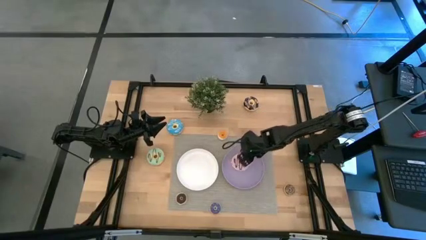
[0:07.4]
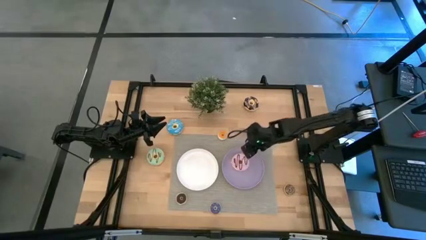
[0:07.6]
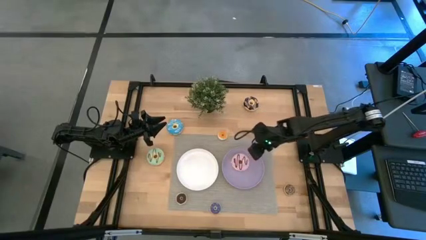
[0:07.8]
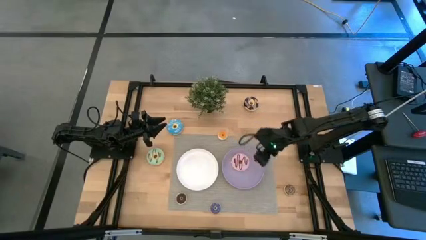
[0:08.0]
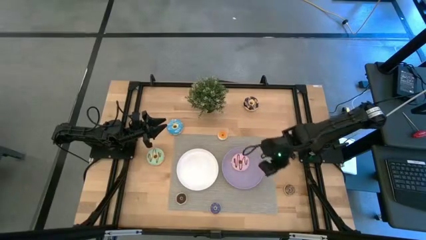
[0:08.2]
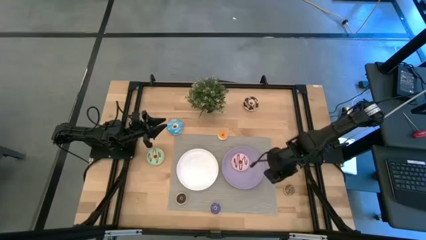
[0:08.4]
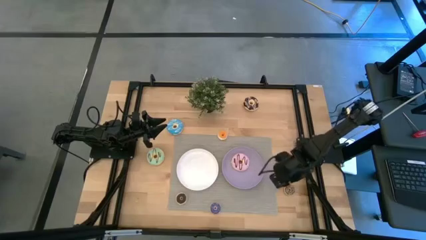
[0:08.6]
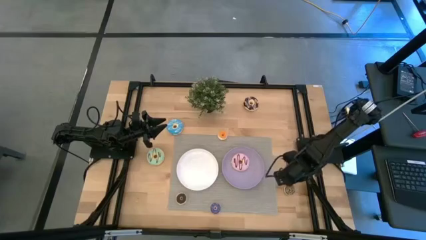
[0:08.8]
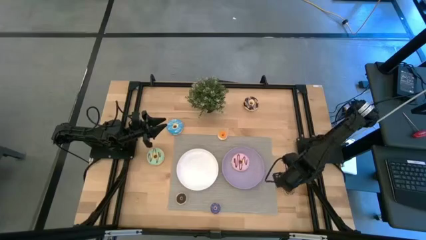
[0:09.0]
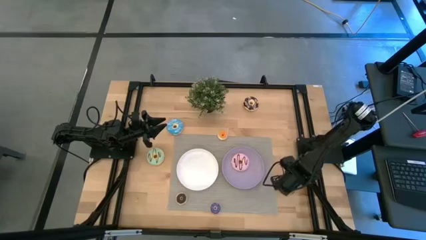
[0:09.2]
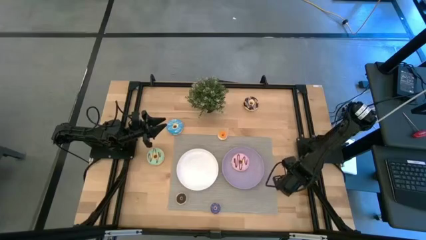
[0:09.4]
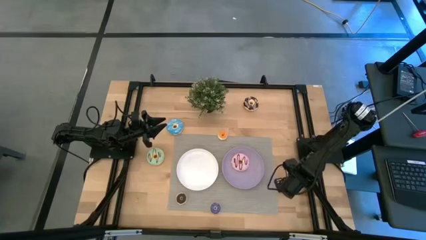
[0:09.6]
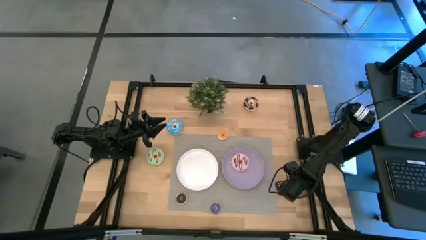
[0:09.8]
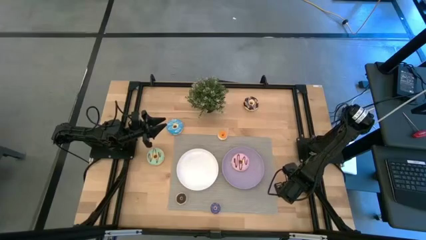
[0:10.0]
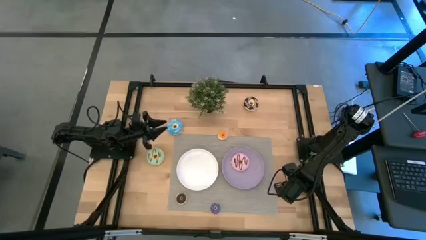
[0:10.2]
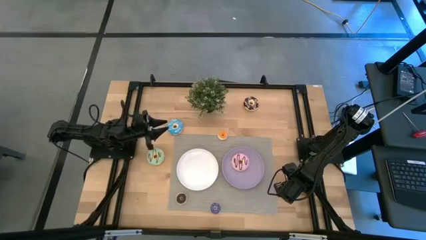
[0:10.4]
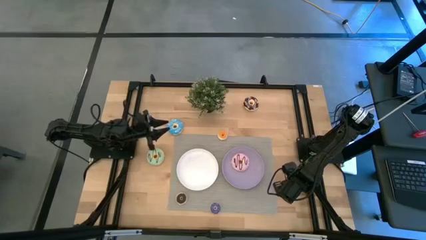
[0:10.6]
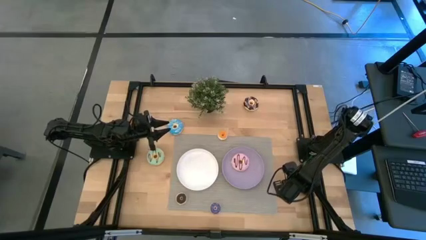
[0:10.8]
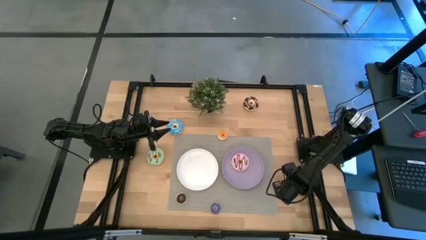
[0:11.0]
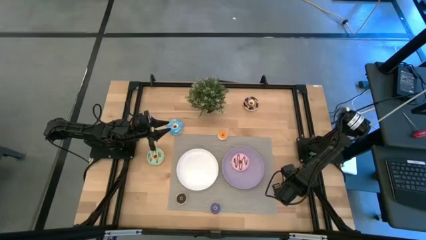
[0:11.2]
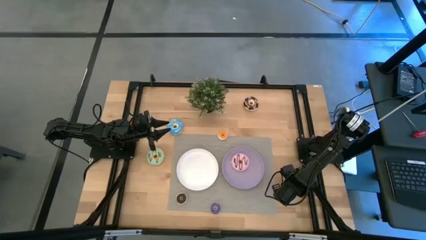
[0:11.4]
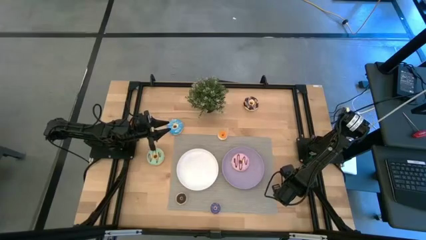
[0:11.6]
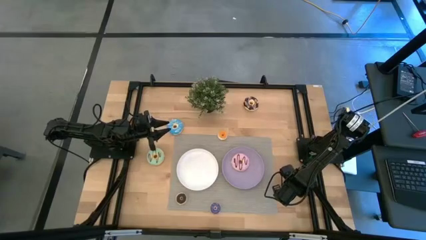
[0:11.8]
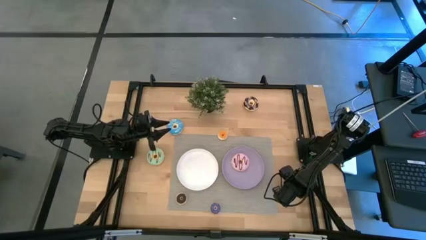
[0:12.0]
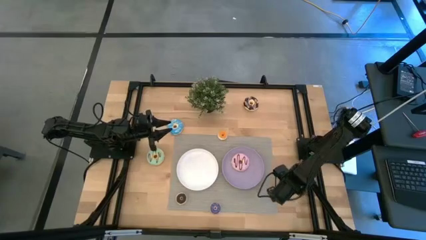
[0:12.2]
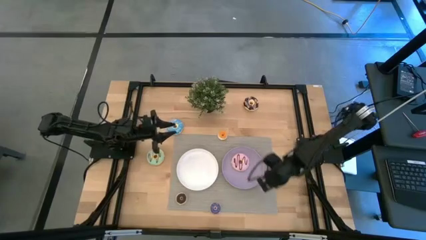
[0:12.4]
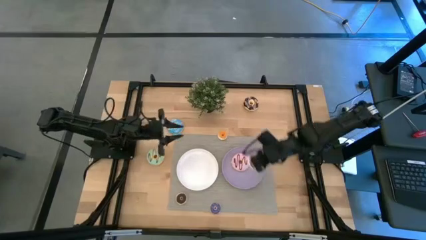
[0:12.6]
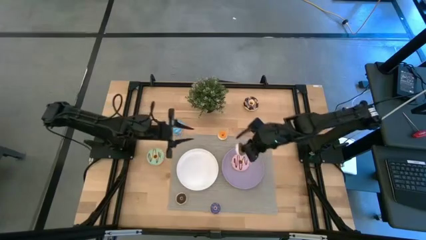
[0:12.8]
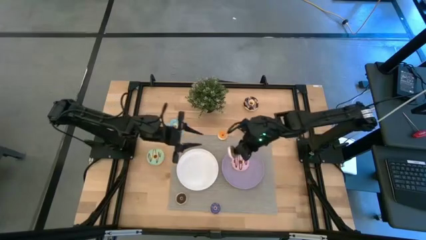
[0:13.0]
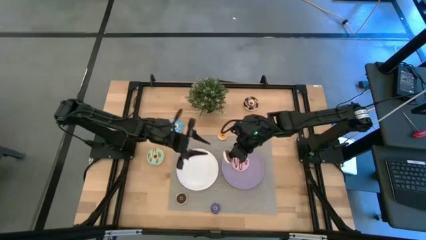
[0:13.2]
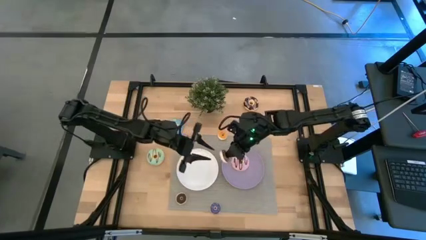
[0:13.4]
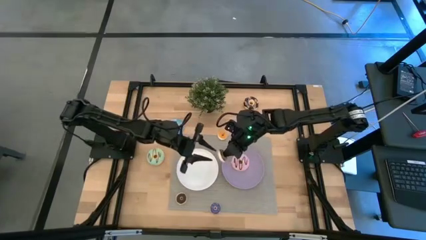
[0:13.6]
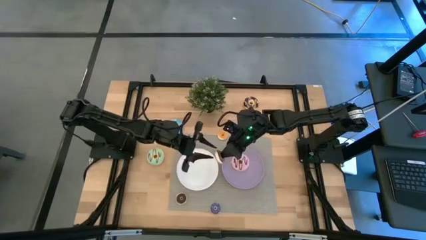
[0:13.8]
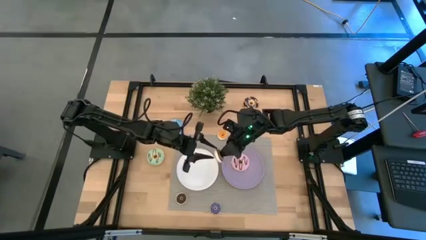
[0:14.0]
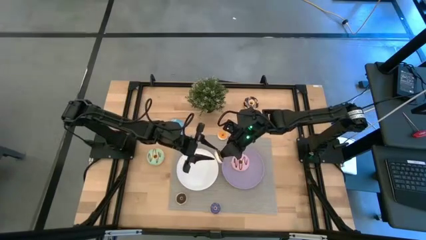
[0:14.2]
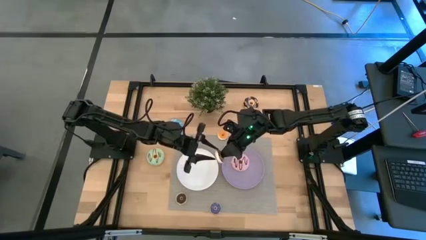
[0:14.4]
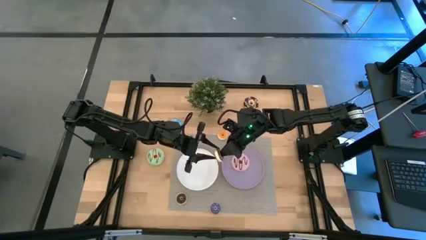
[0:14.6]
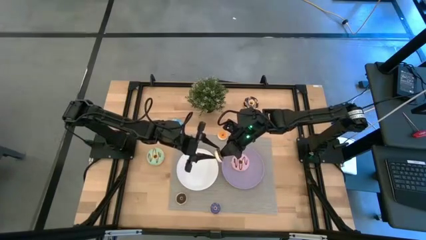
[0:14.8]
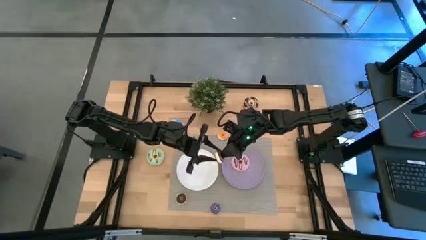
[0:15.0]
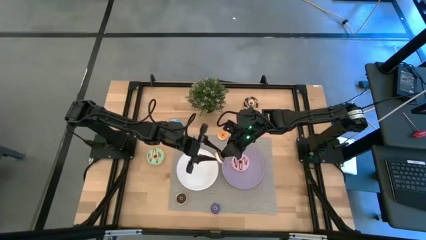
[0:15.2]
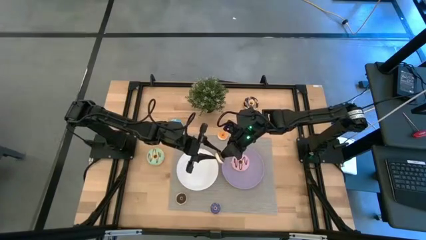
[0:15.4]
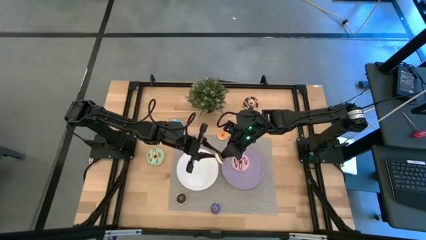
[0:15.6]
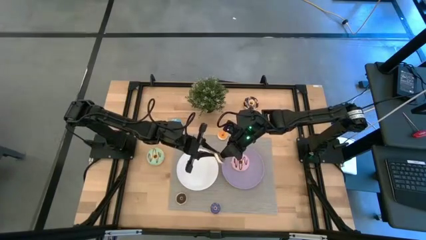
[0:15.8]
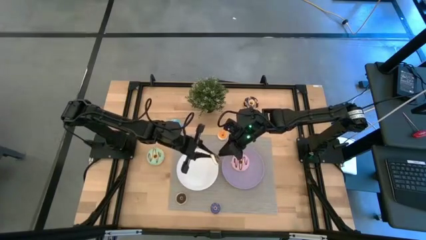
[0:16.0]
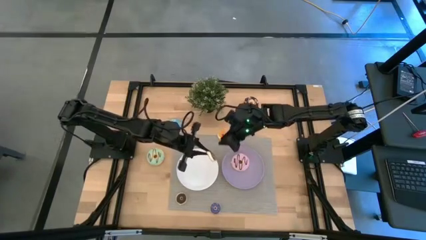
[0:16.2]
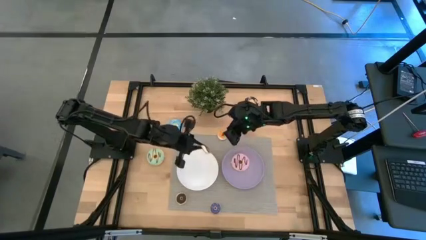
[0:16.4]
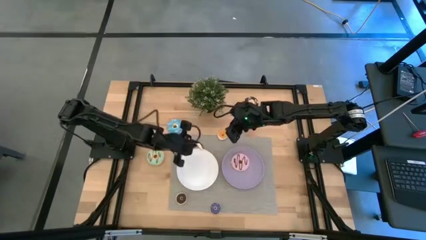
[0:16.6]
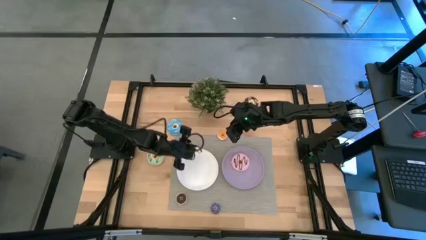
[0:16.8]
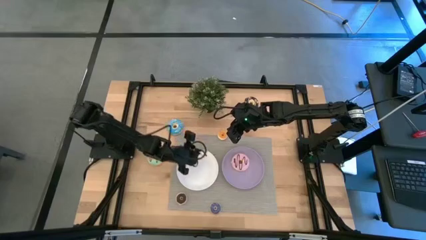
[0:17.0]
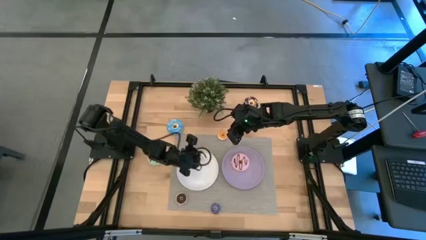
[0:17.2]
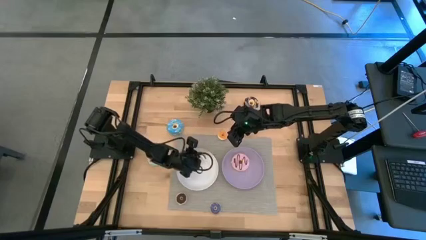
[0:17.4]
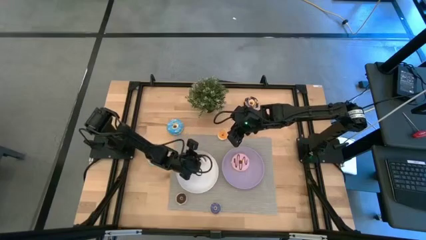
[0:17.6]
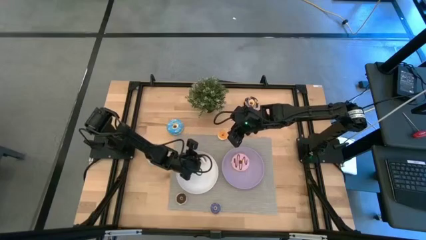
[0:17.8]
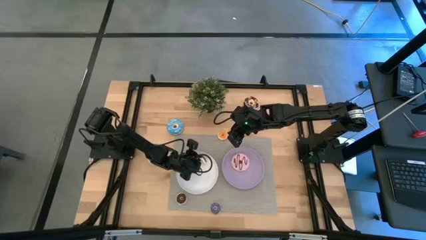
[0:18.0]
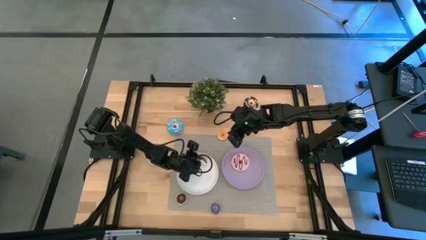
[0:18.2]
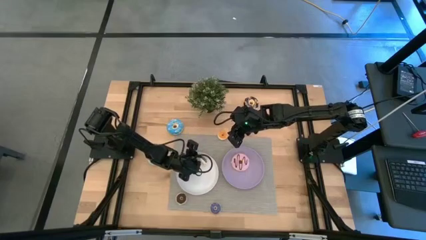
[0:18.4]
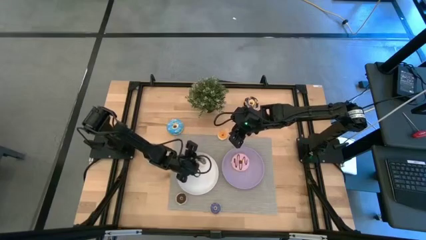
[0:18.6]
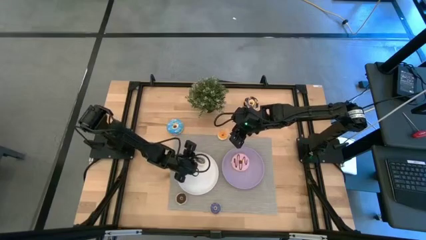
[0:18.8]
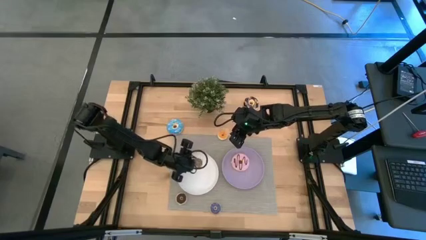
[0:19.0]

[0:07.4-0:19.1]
Task: Pick & Place donuts
Put the small light brown donut on the white plate
